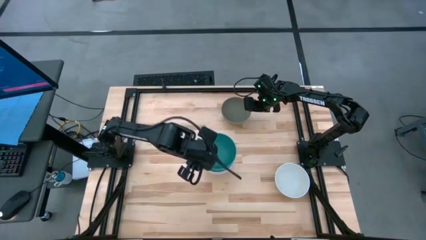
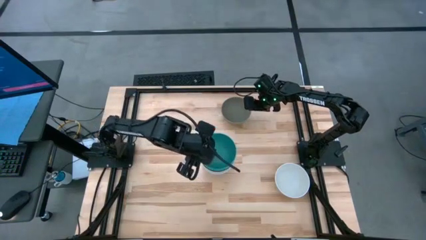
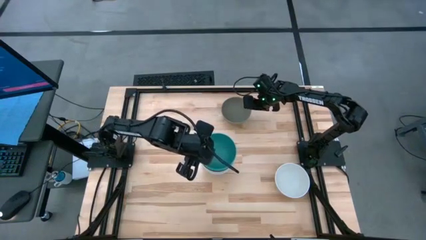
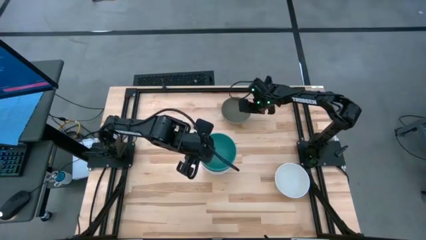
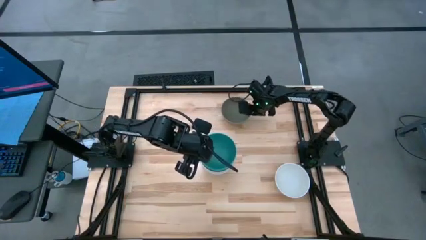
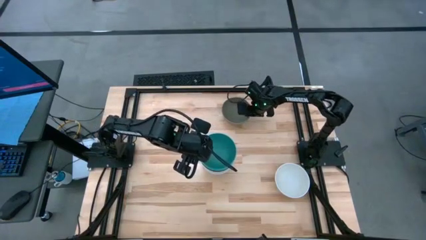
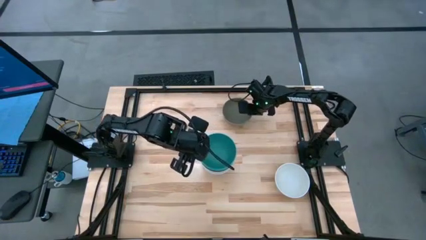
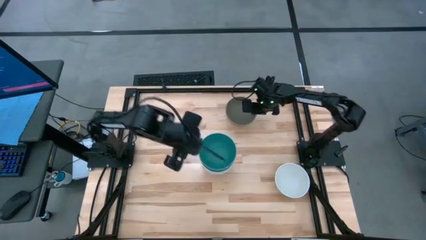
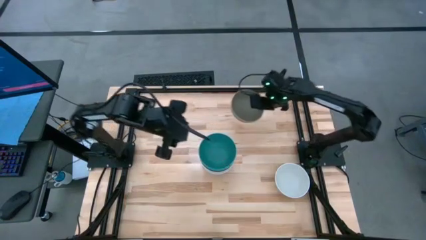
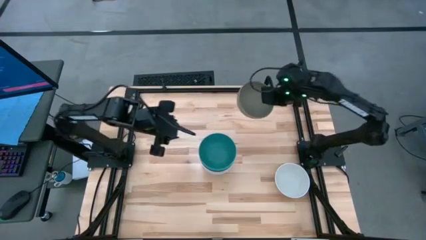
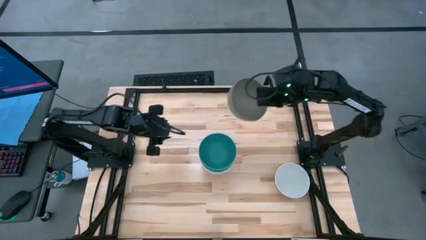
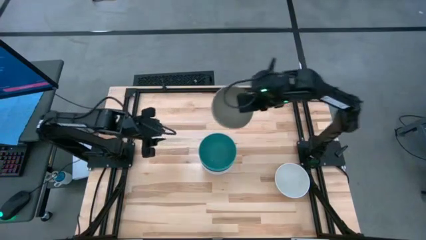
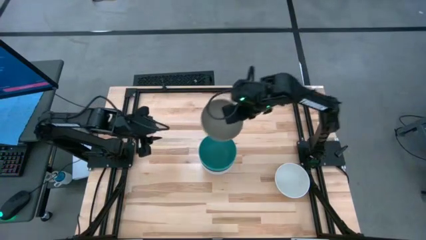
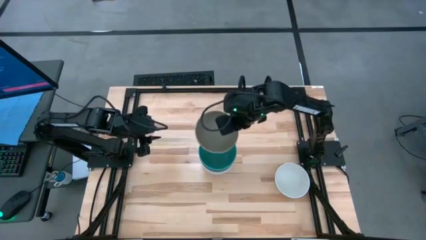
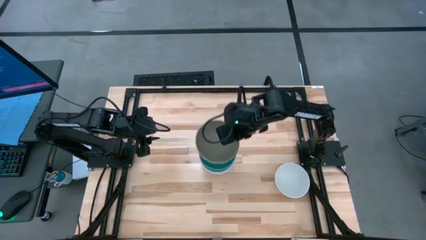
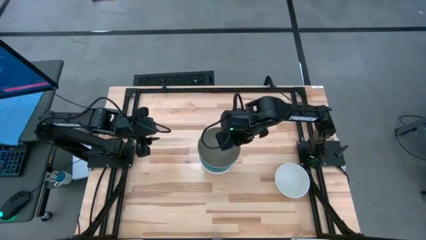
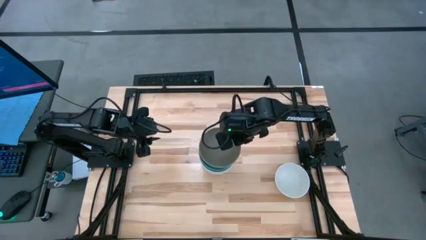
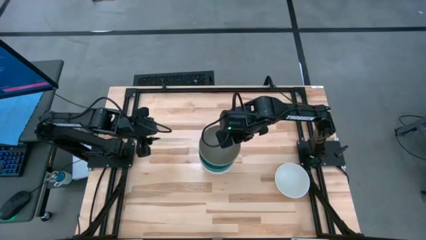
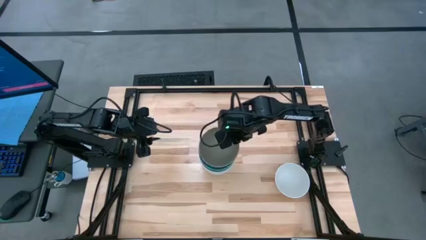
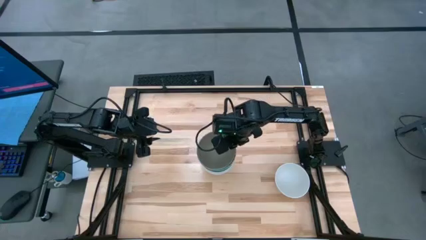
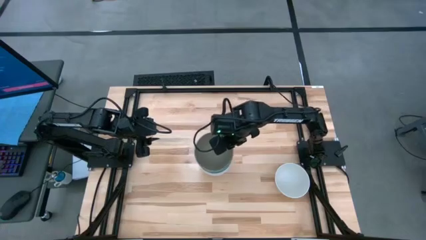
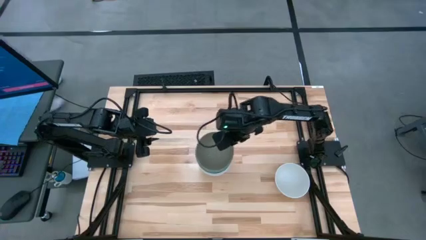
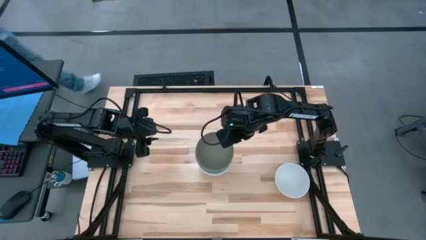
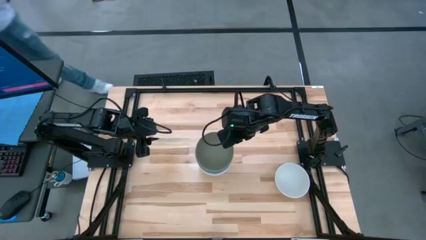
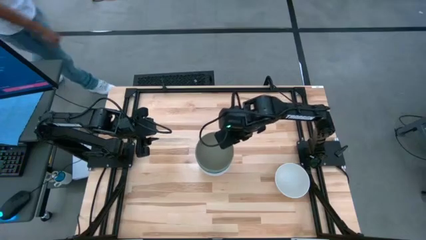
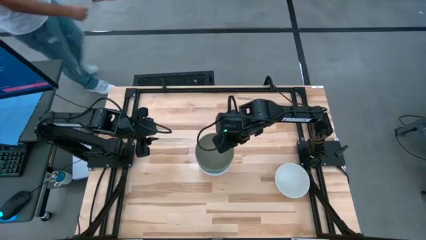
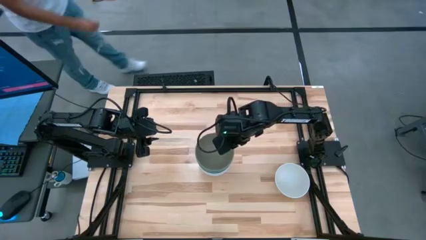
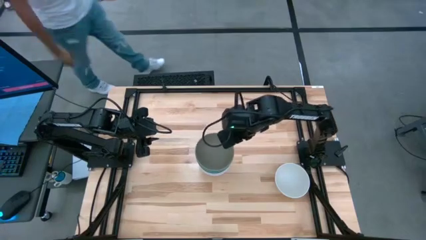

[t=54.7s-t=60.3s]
Task: Nest bowls inside each other
Stack the brown bowl on the top of the blue bowl

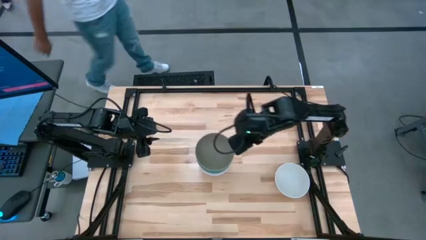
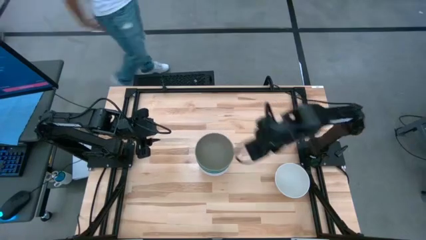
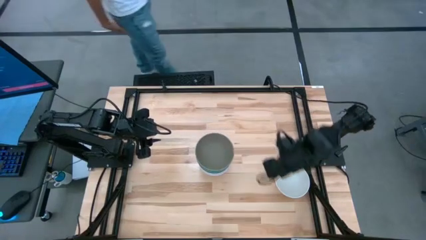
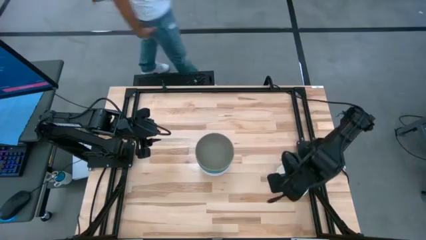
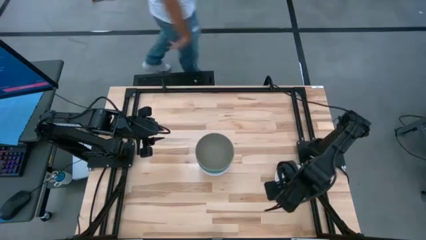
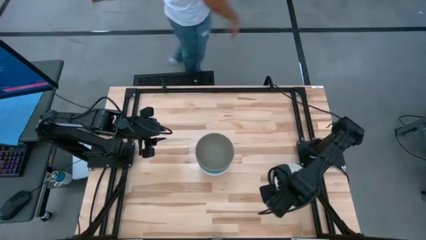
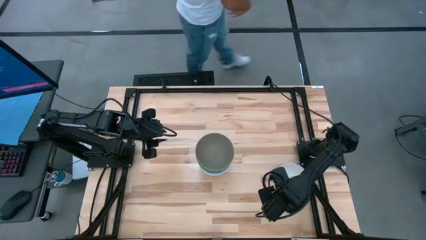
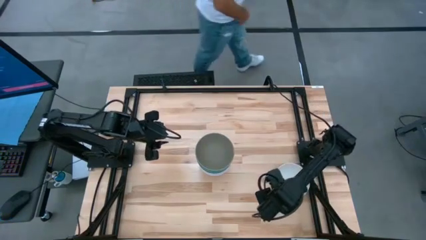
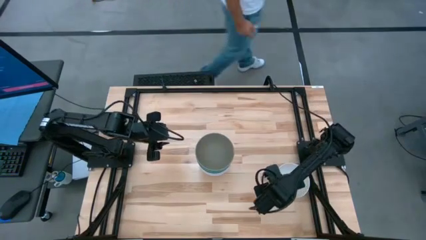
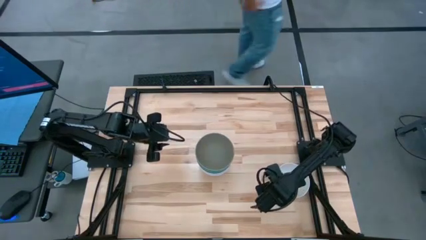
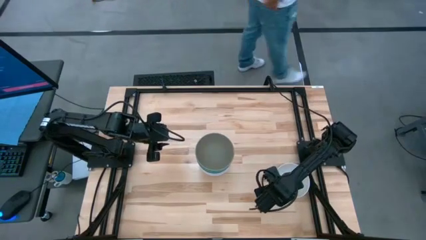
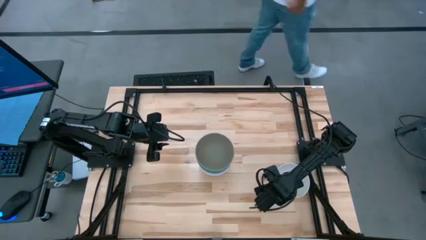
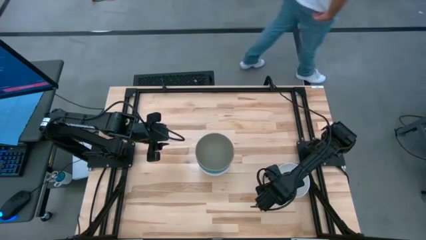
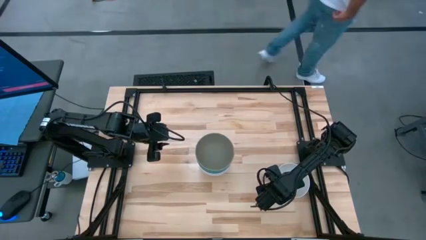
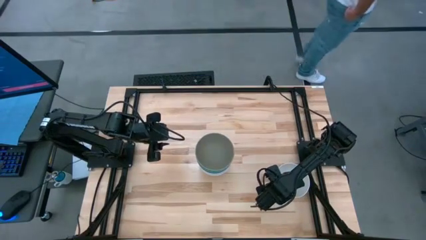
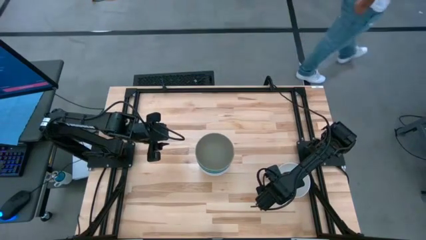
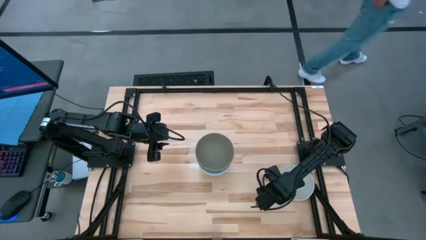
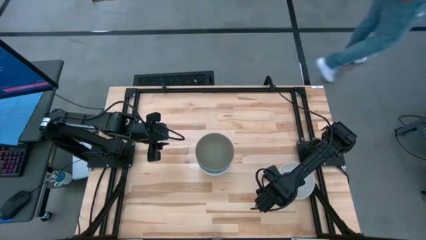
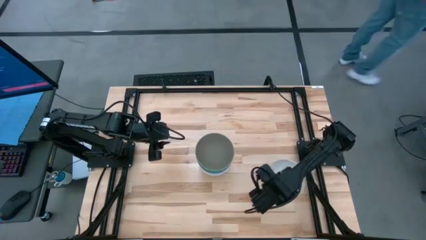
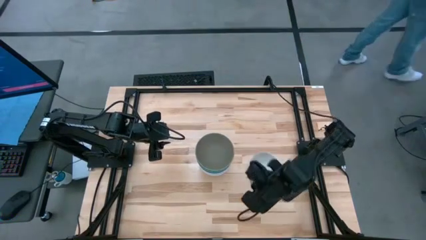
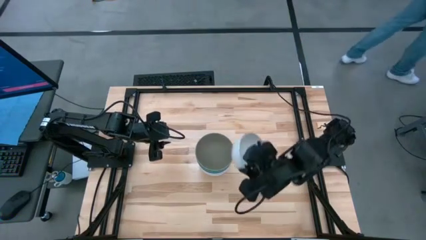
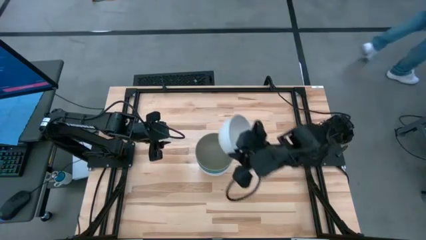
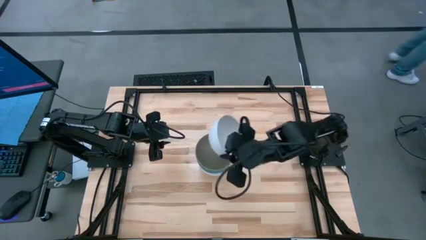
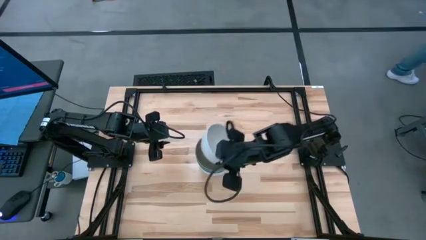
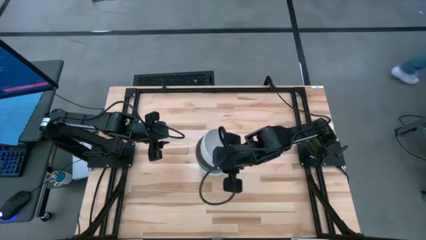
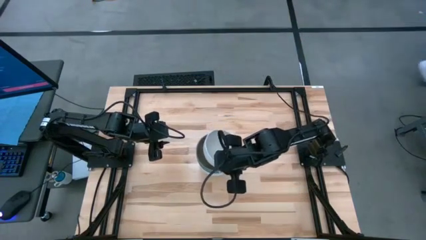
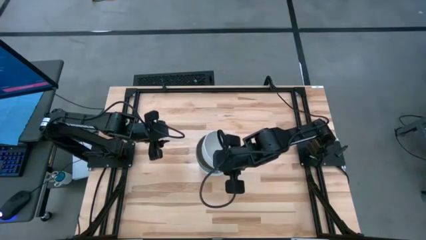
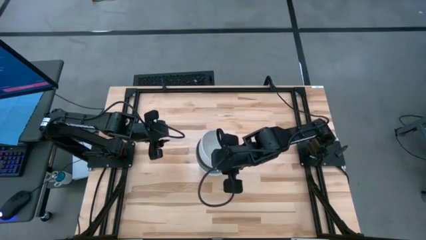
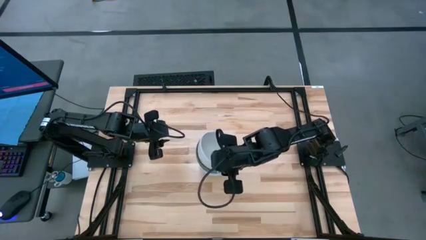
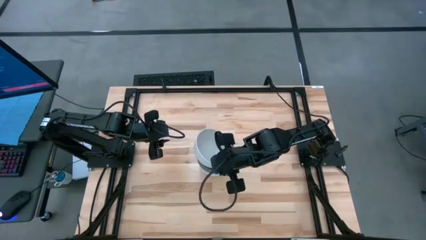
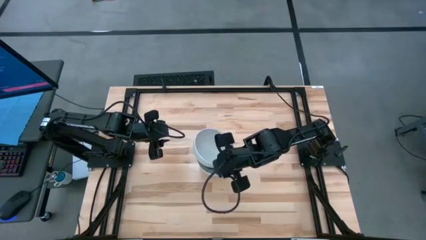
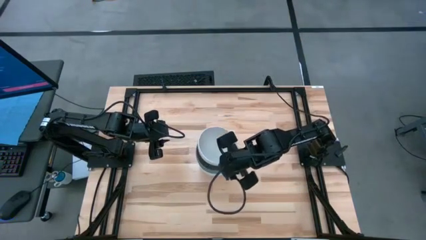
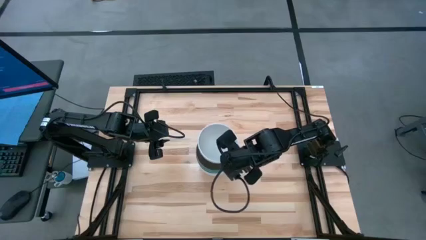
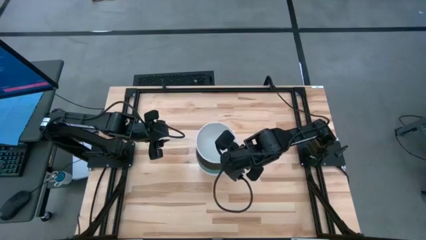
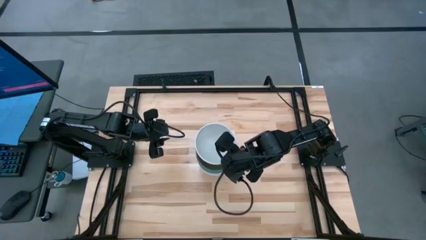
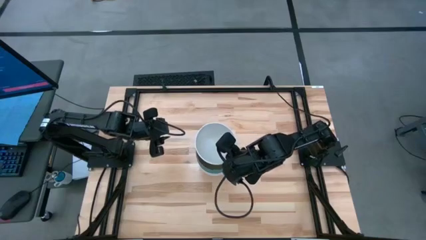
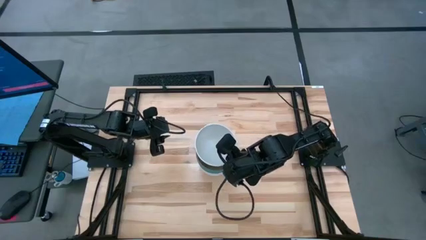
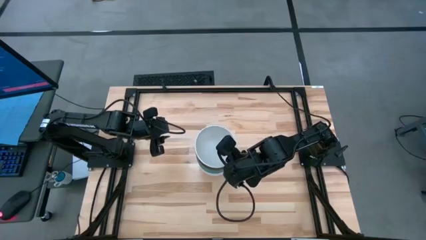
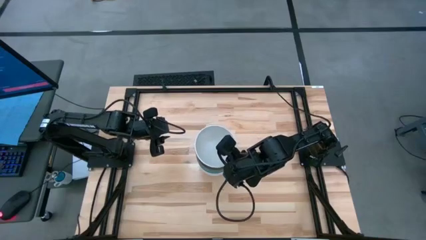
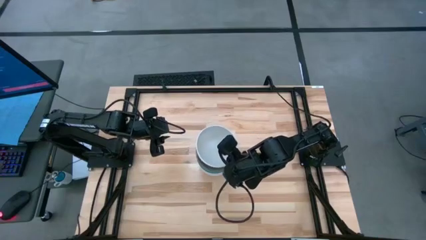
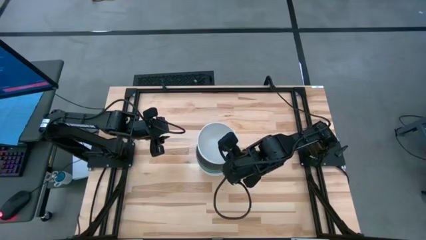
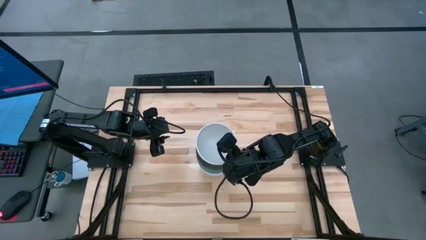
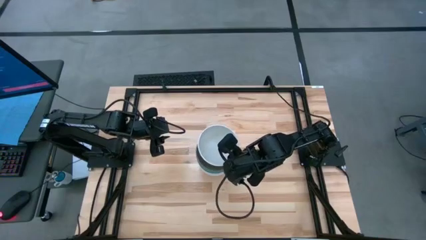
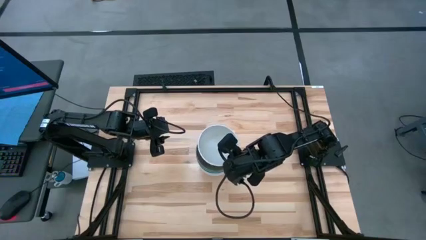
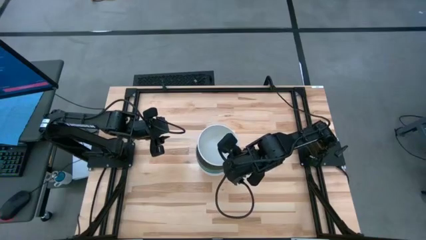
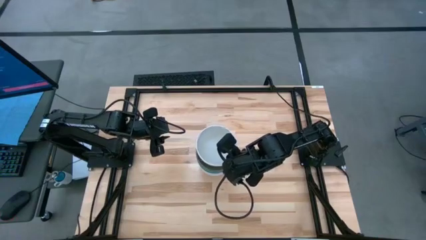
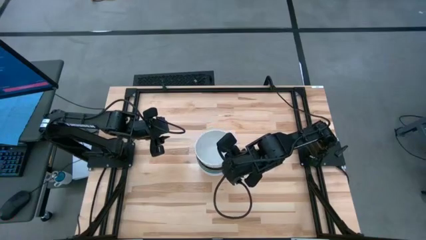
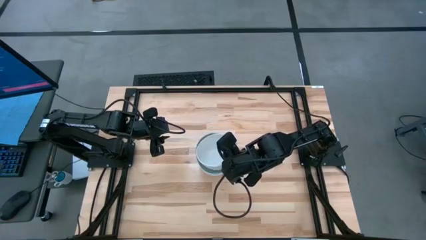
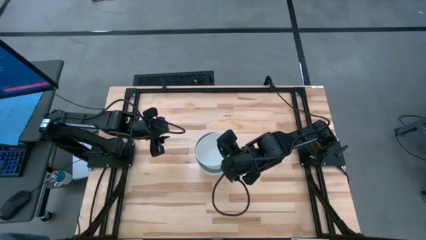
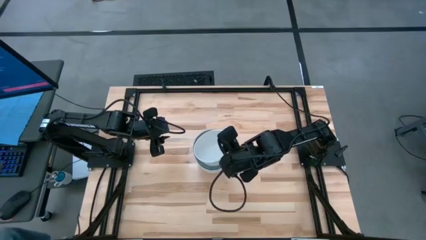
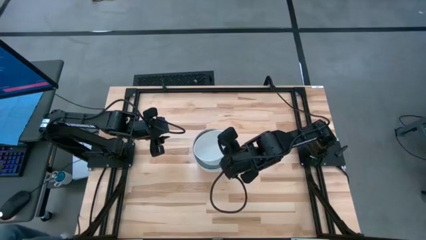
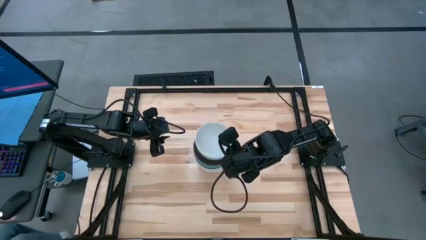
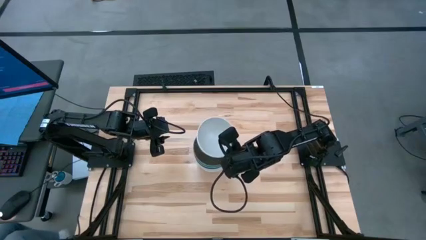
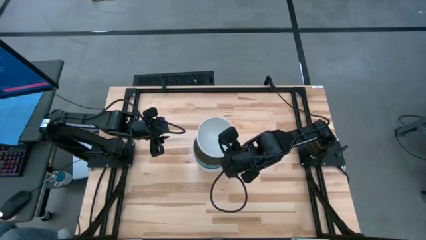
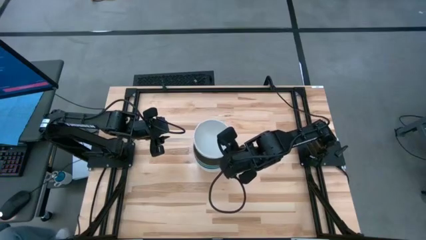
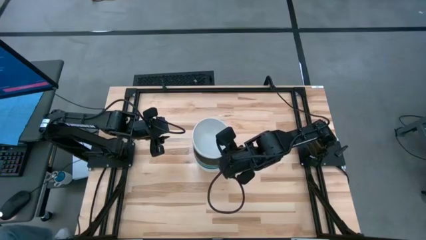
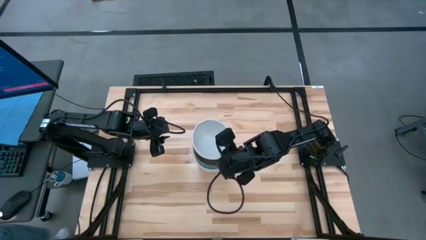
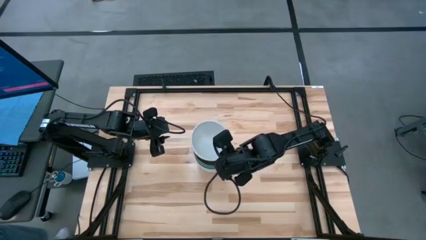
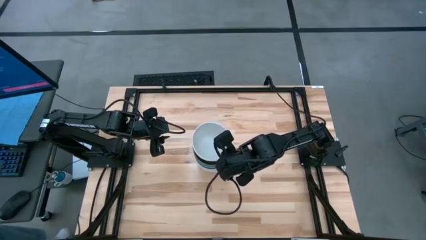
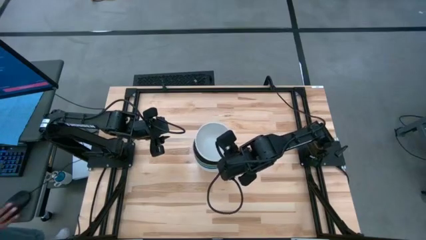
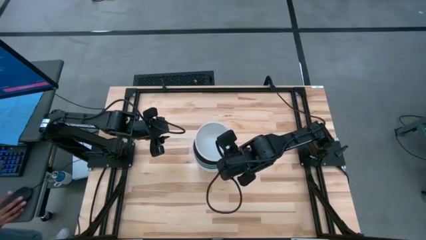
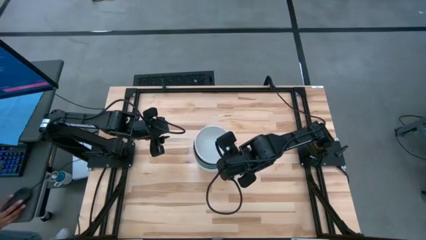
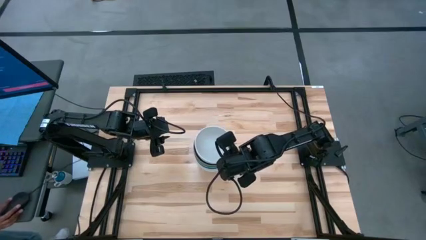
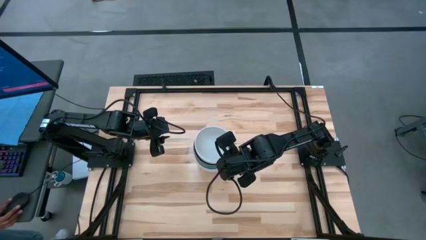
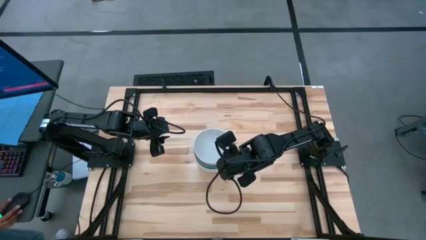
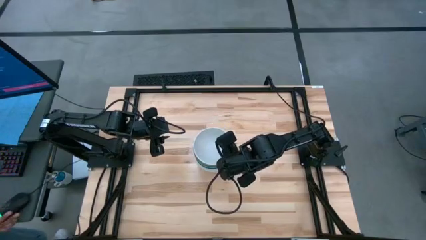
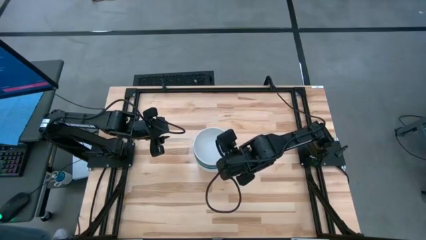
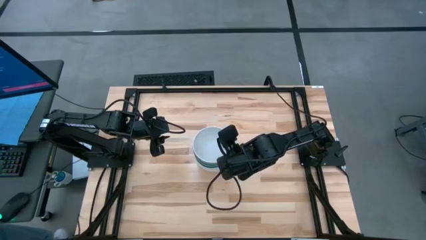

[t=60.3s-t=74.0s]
Stack the white bowl on the top of the brown bowl
